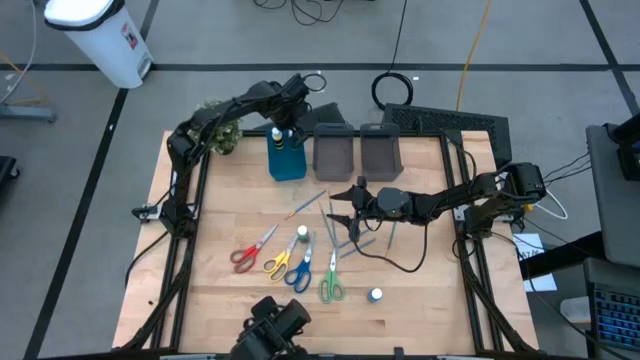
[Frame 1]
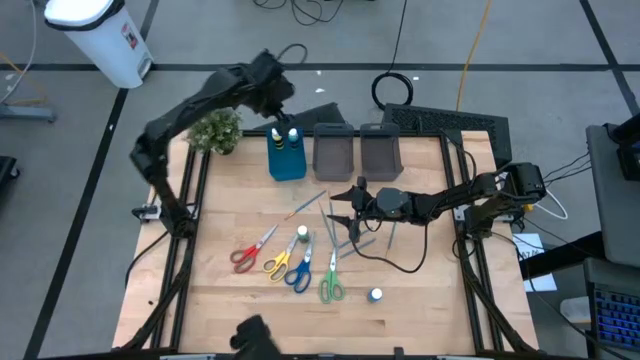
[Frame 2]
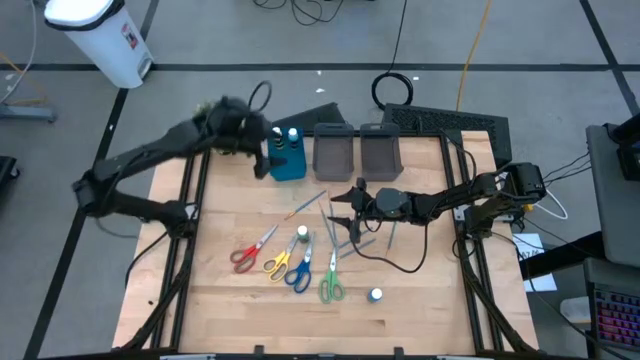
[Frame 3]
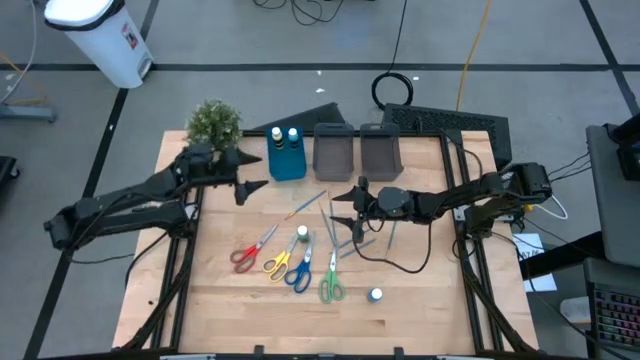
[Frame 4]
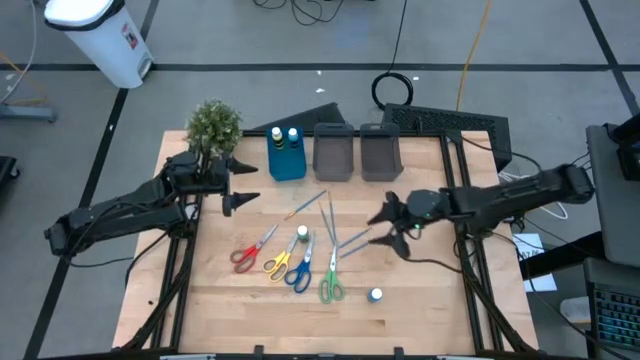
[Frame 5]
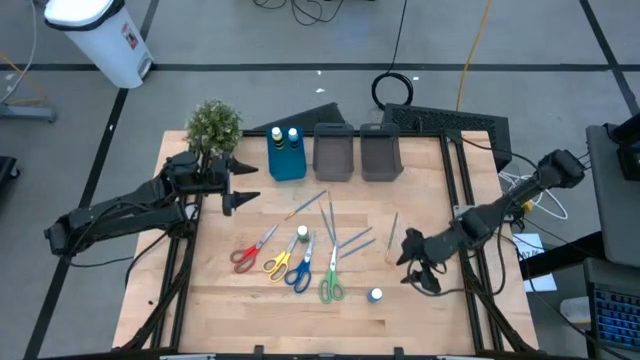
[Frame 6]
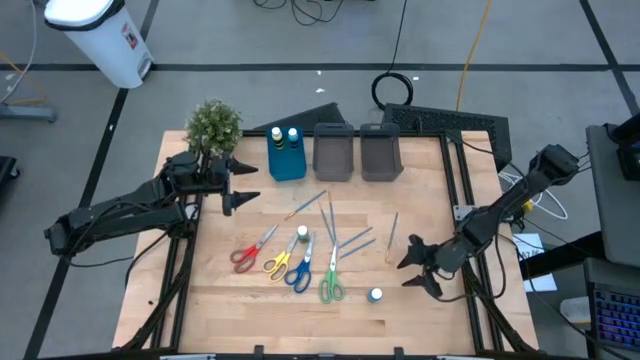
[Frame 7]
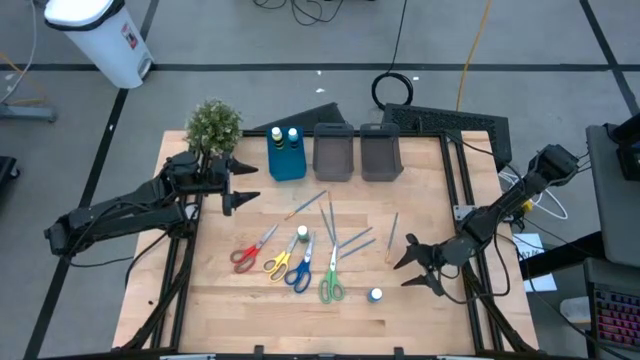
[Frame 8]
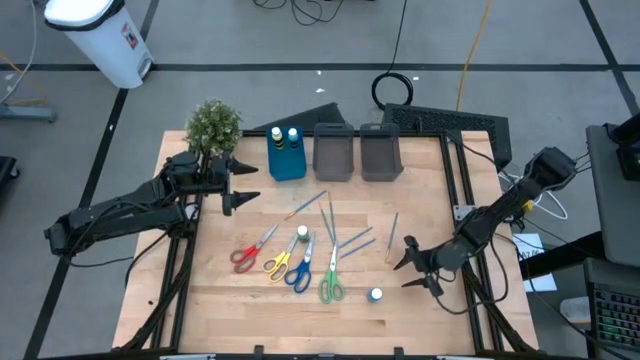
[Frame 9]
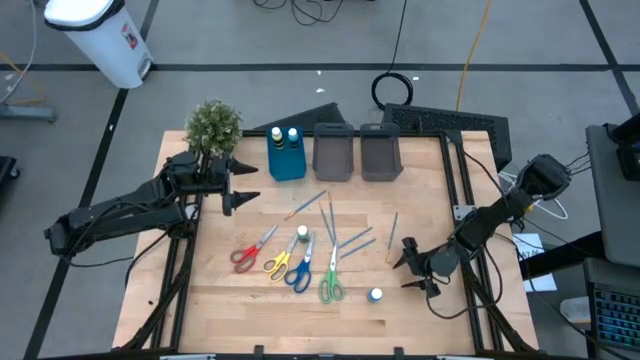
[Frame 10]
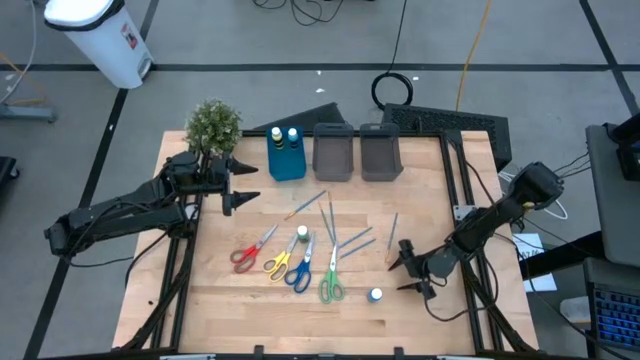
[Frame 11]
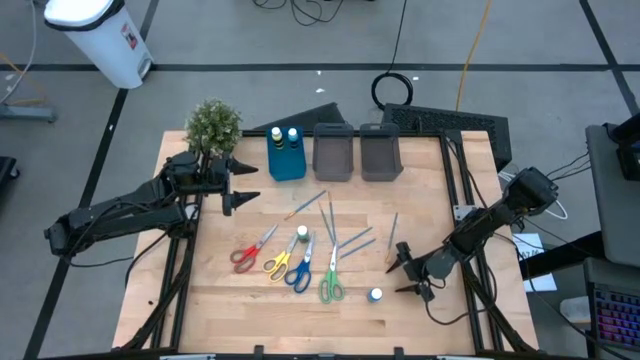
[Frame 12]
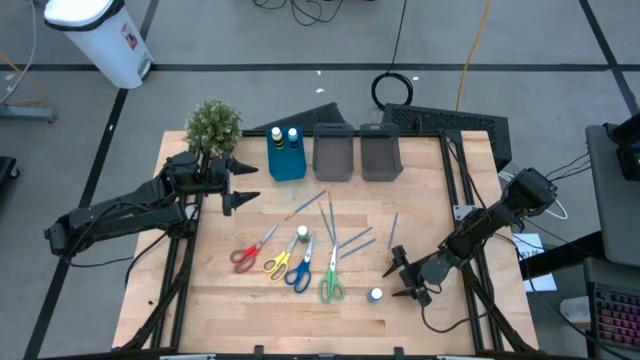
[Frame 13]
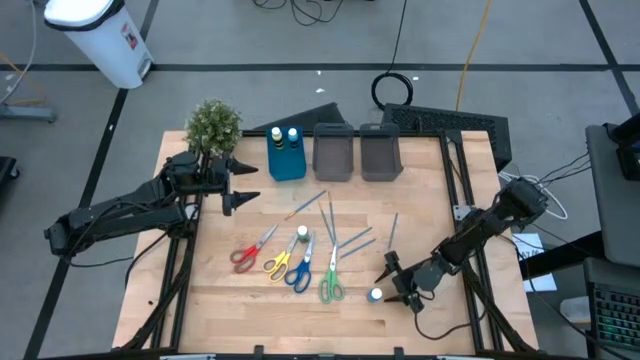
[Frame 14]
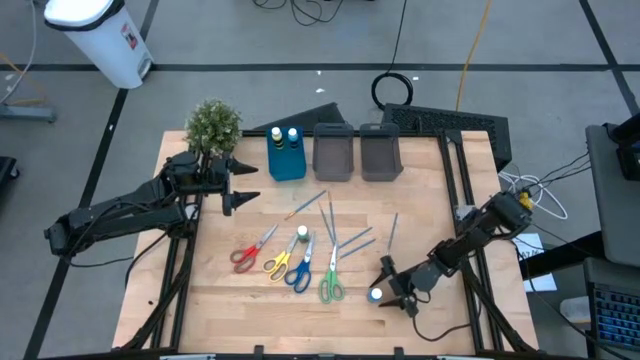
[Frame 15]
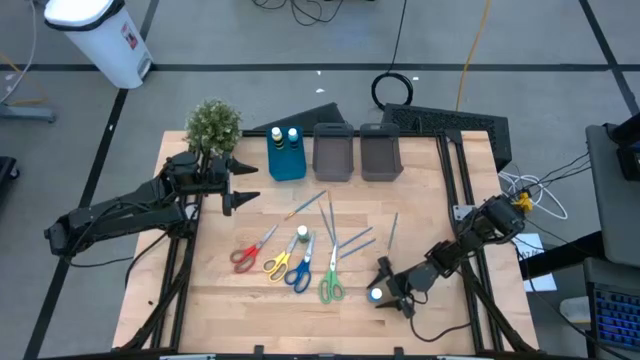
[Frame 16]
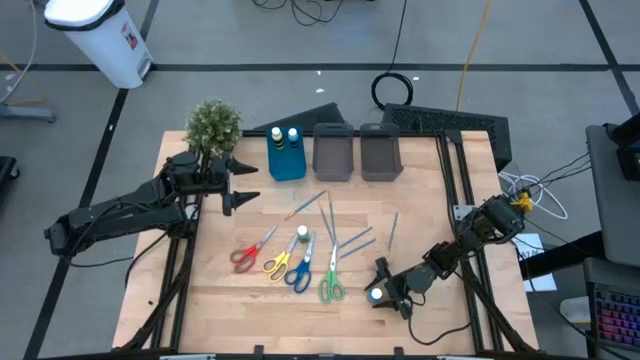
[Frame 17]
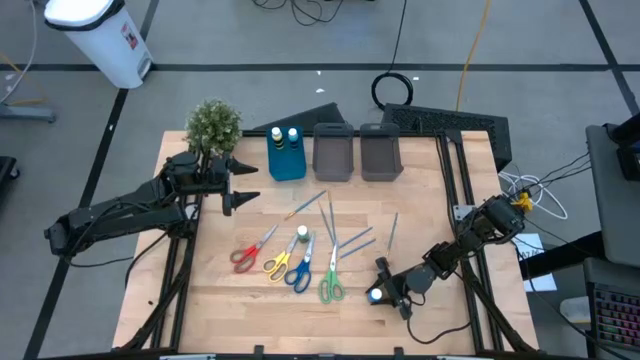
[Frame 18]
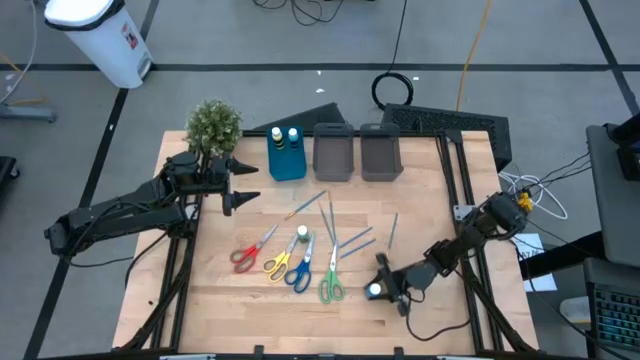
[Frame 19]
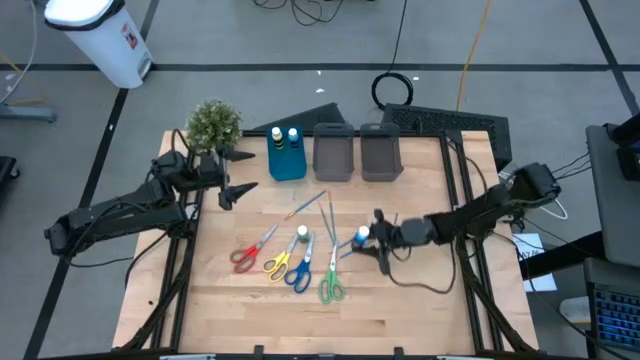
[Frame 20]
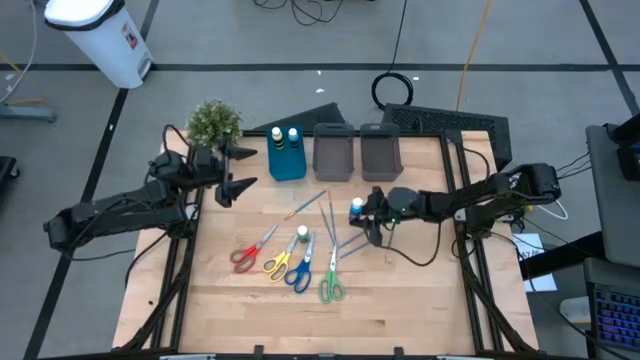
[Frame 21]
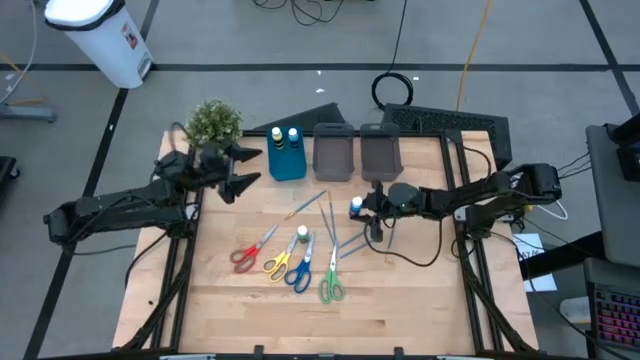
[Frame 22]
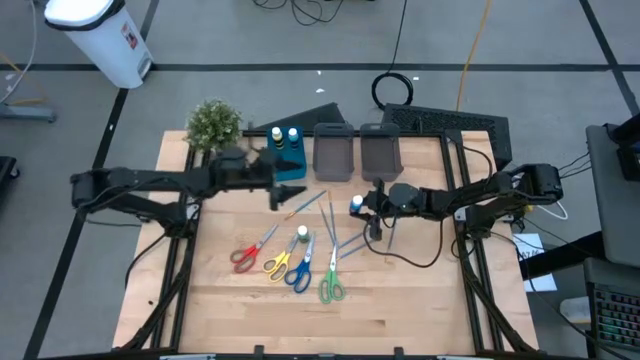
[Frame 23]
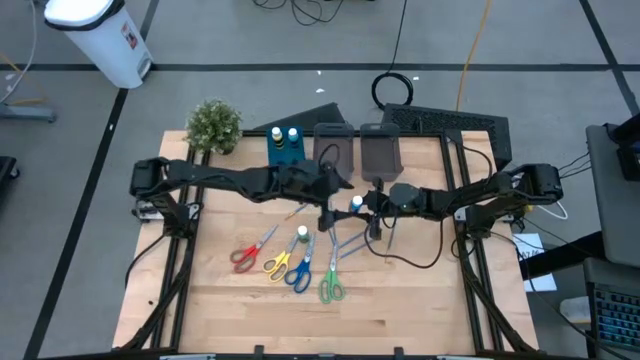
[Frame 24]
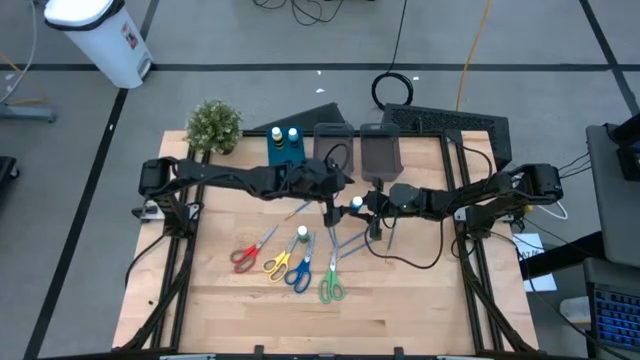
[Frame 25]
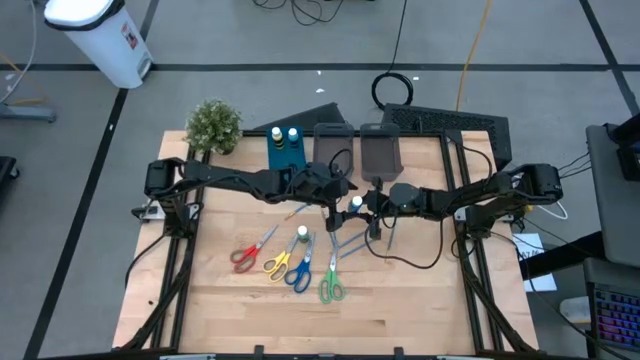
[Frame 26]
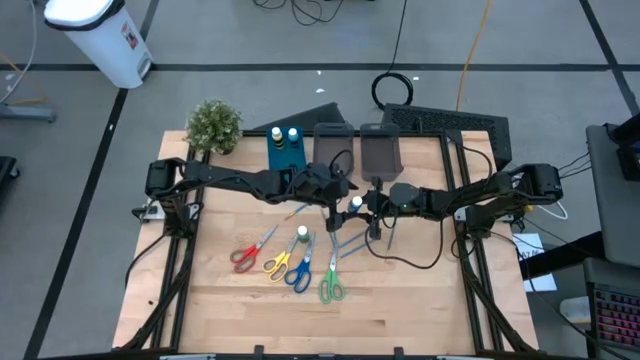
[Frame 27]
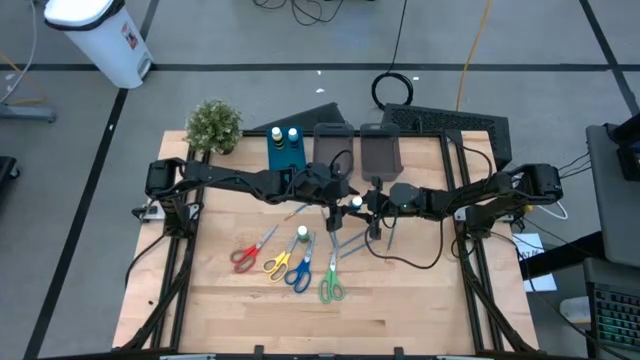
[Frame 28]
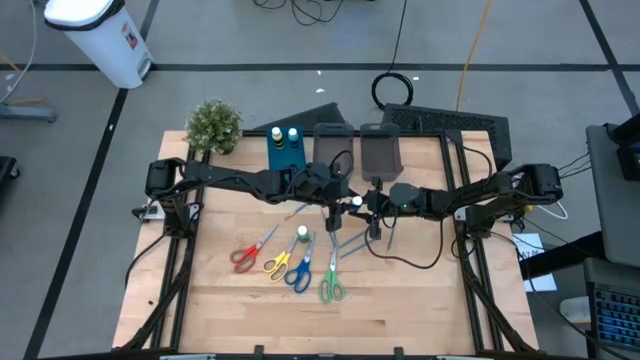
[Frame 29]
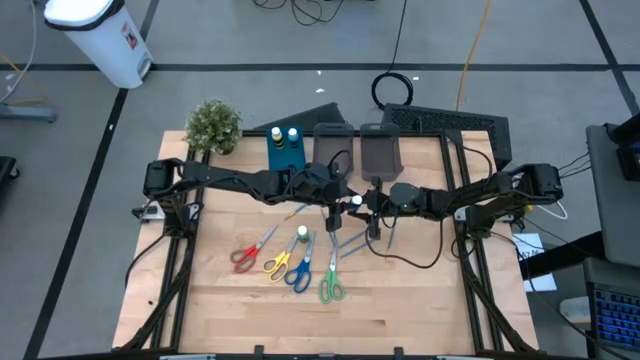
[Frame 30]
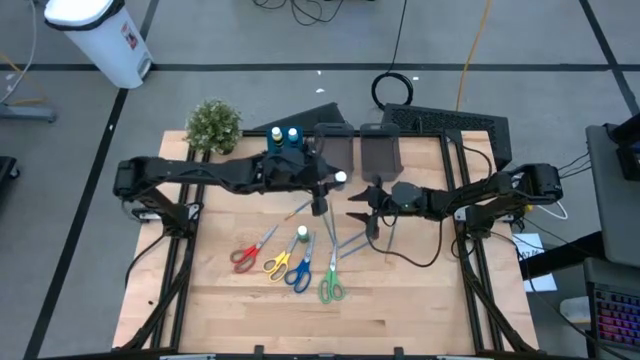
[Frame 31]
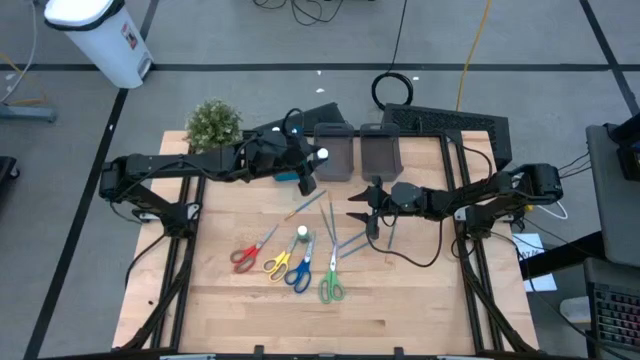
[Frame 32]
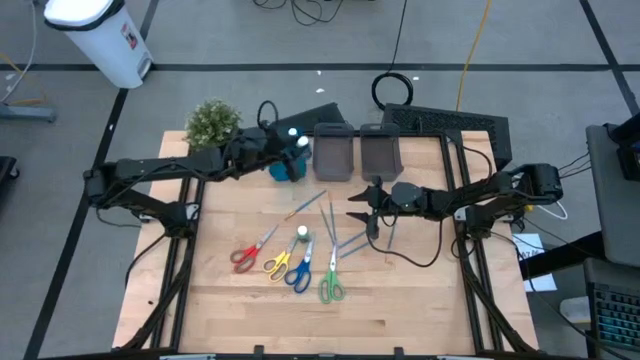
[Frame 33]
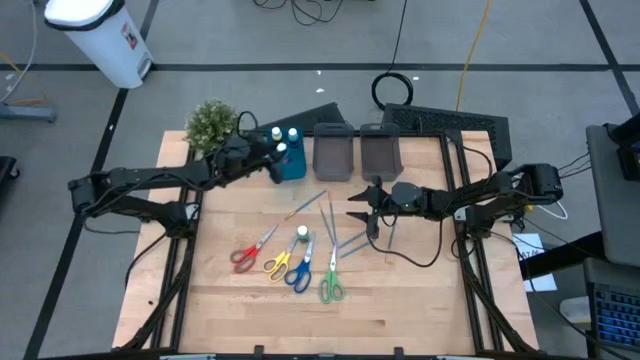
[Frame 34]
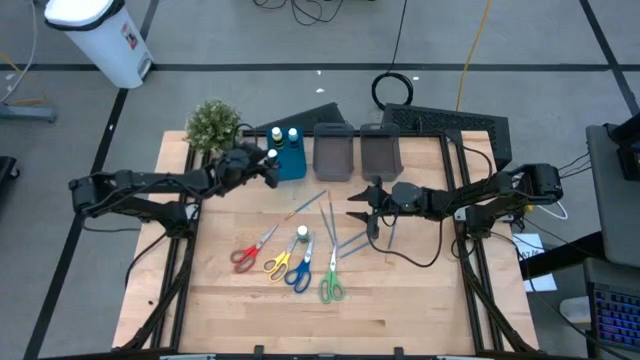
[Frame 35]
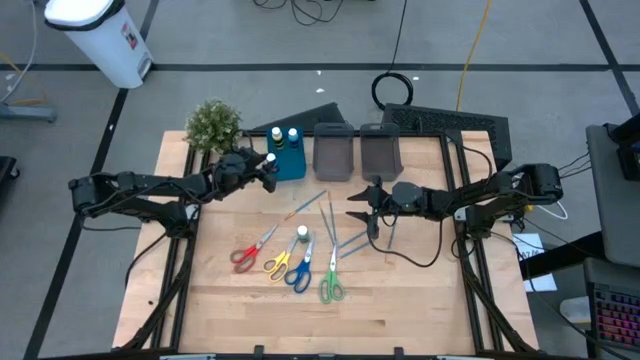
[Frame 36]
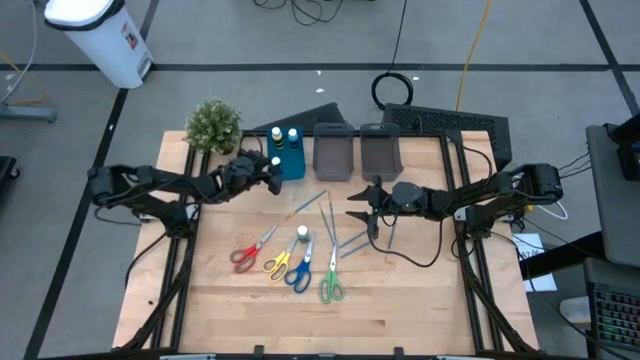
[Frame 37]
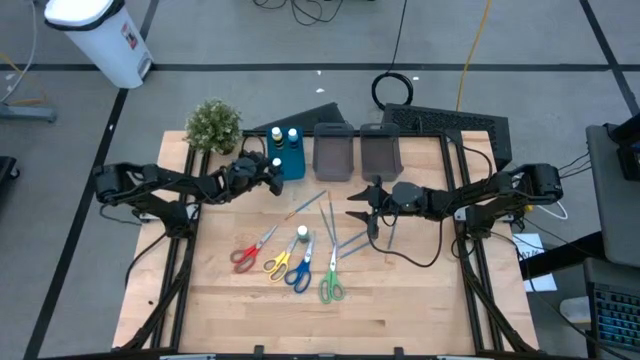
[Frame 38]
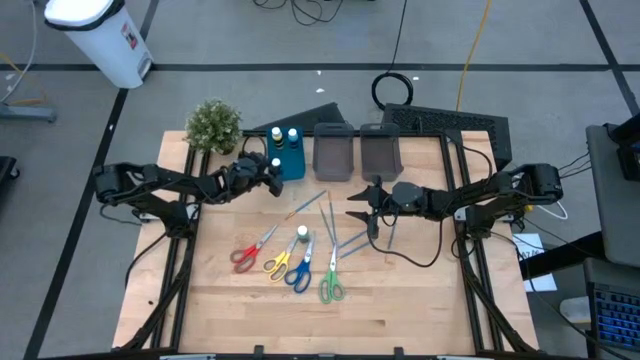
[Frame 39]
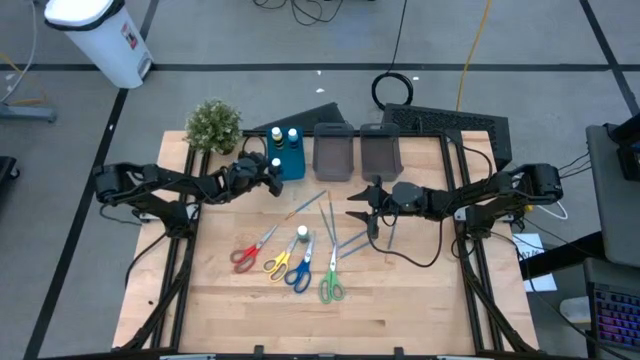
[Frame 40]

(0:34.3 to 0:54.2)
Task: Pick & Place Paint Supplies
Put the blue paint into the blue bin

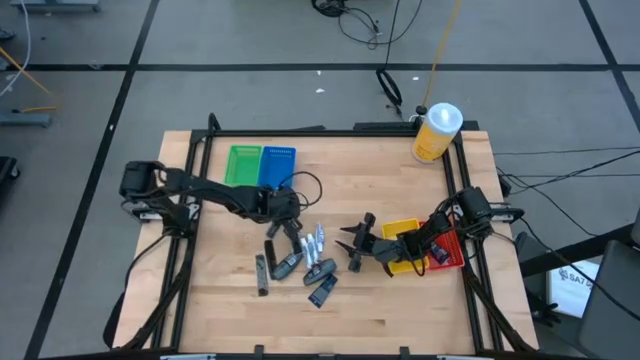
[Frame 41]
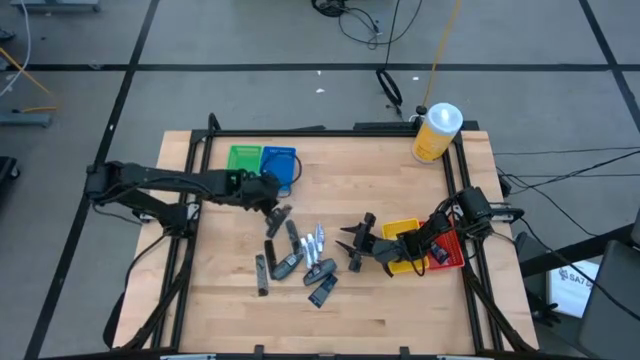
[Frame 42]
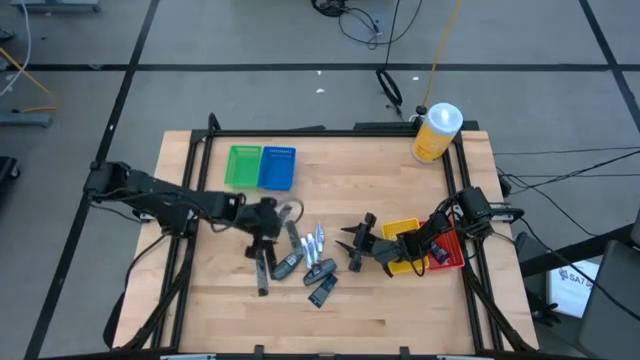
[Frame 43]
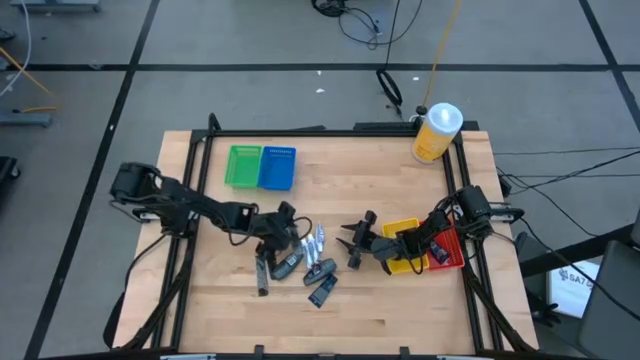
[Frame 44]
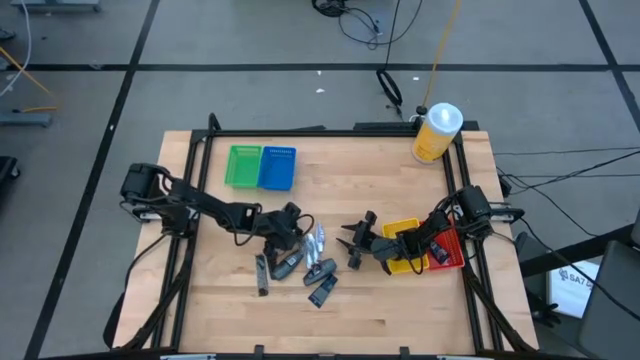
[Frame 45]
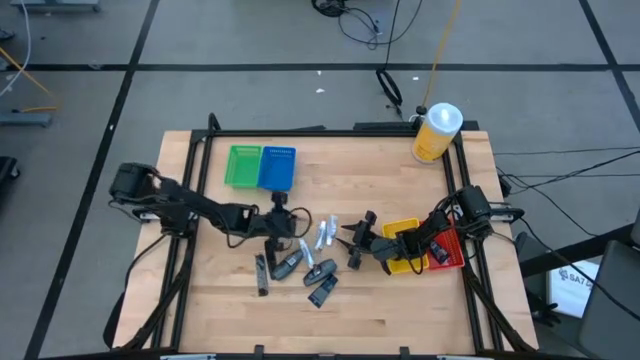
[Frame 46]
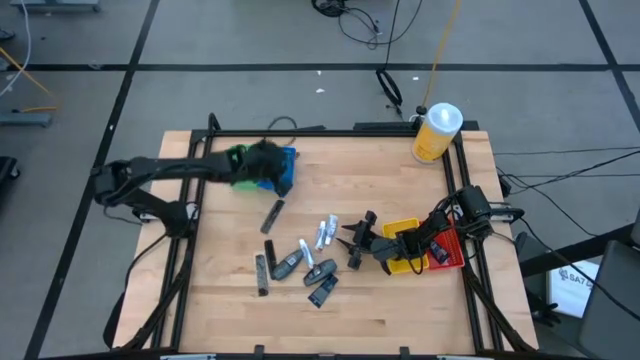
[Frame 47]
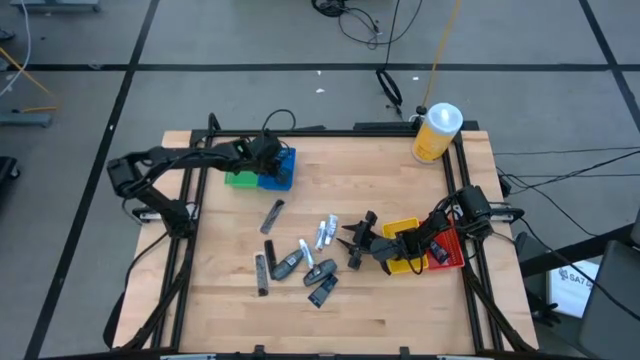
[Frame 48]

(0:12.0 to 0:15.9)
Task: Pick & Place Travel size toiletries
Put the black comb into the blue bin
